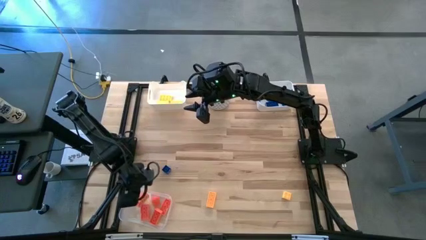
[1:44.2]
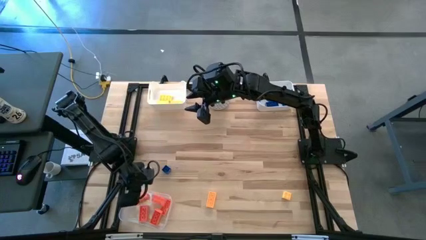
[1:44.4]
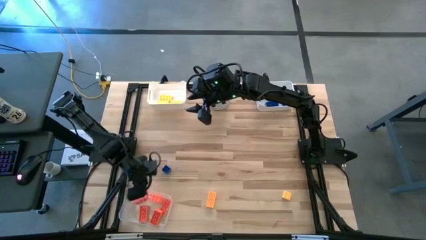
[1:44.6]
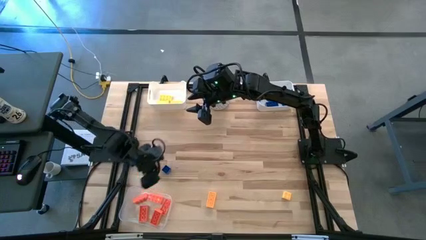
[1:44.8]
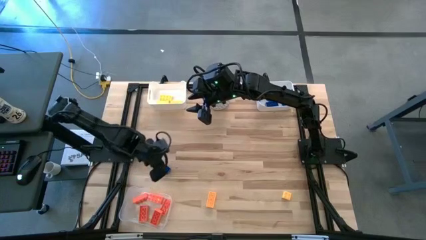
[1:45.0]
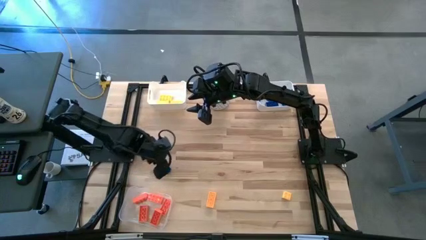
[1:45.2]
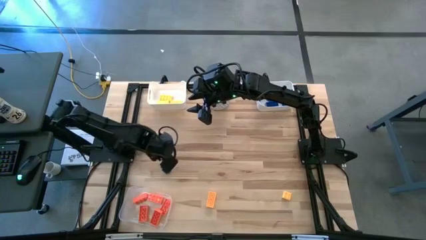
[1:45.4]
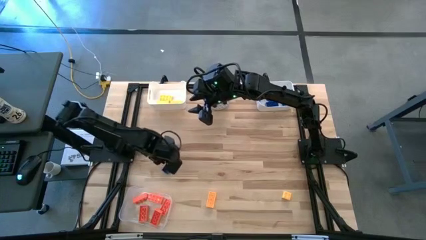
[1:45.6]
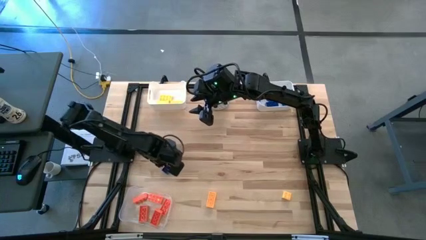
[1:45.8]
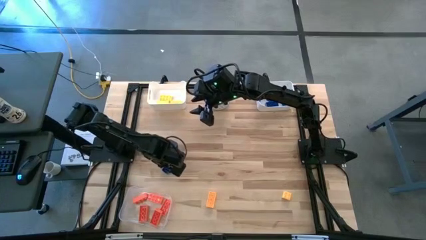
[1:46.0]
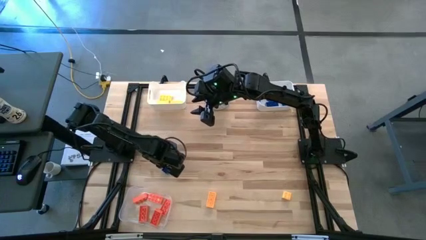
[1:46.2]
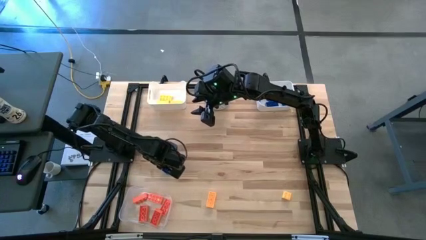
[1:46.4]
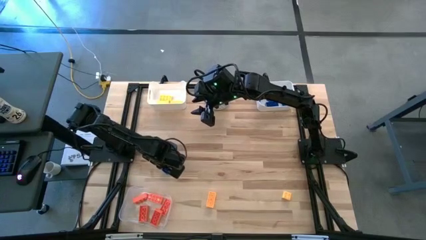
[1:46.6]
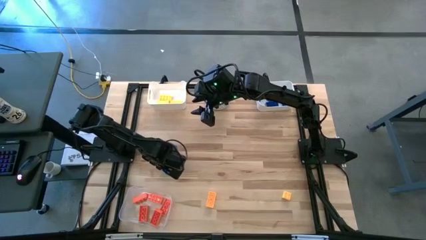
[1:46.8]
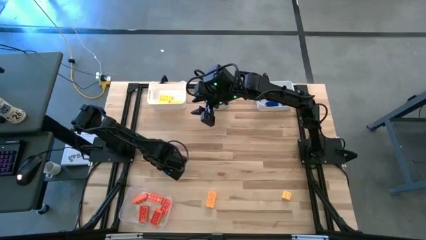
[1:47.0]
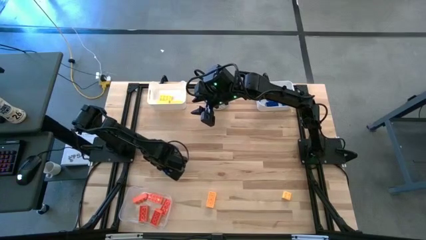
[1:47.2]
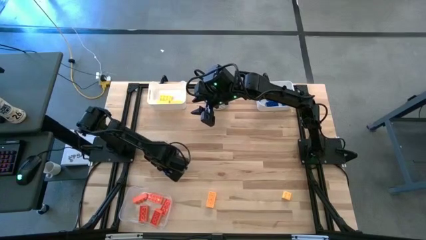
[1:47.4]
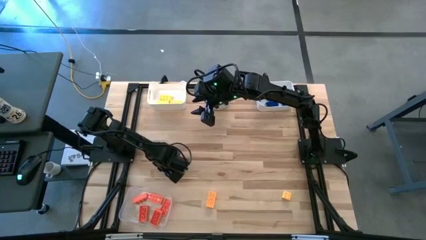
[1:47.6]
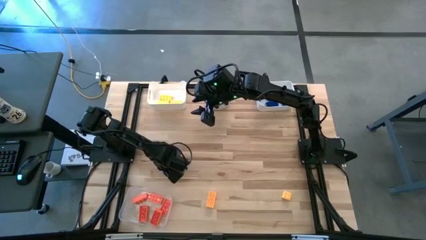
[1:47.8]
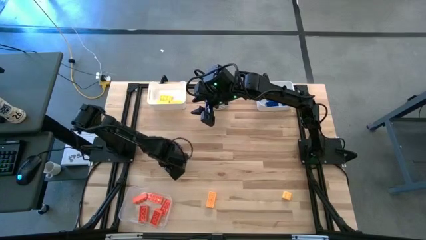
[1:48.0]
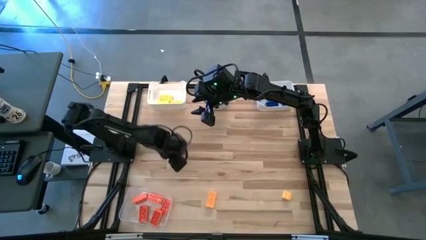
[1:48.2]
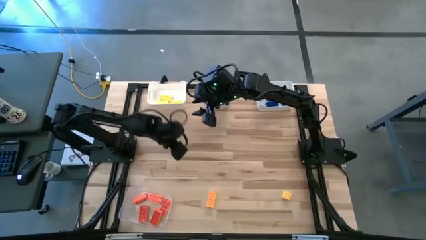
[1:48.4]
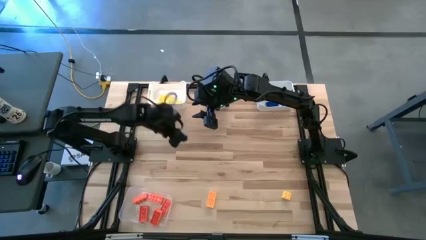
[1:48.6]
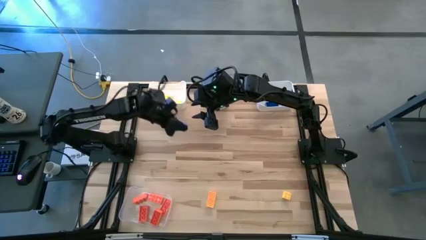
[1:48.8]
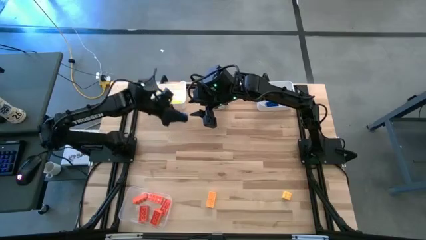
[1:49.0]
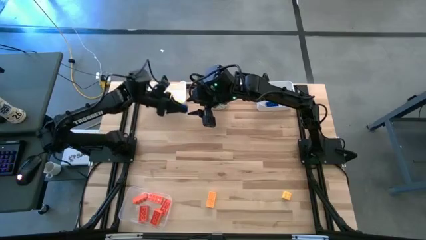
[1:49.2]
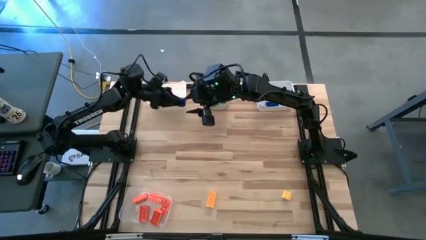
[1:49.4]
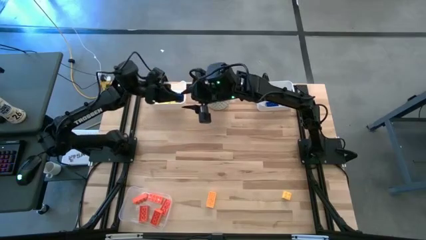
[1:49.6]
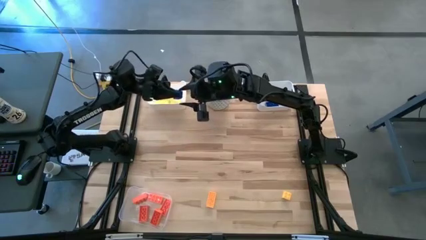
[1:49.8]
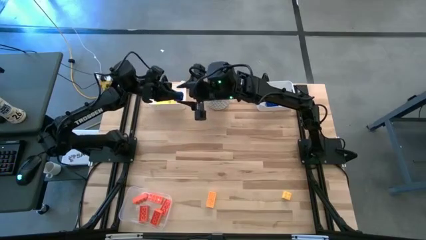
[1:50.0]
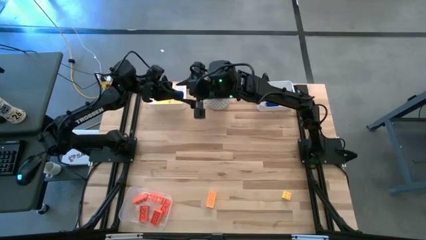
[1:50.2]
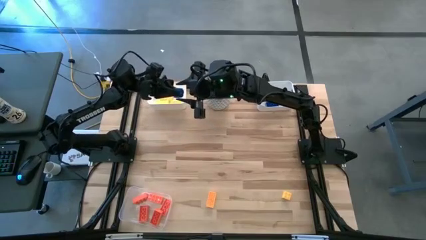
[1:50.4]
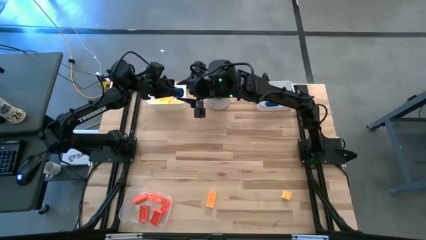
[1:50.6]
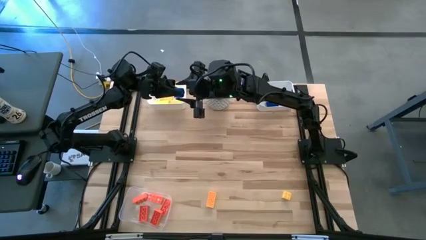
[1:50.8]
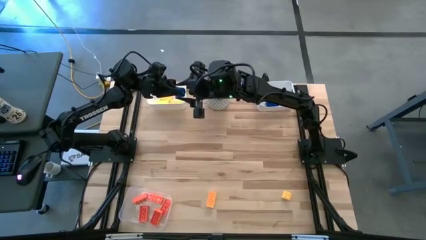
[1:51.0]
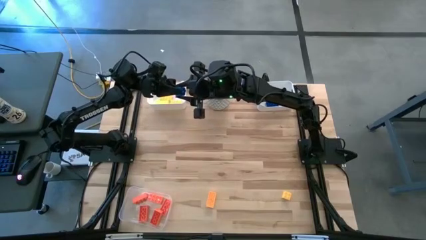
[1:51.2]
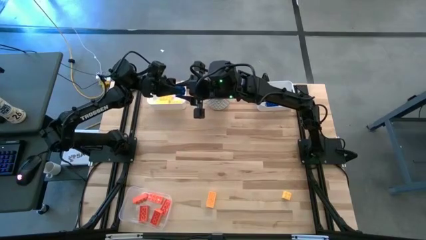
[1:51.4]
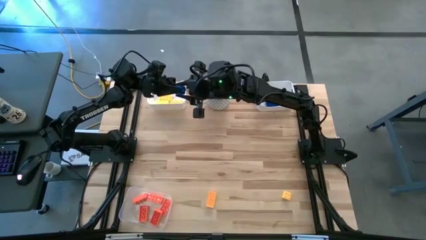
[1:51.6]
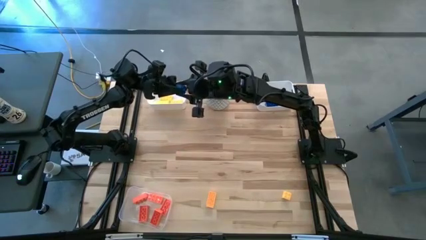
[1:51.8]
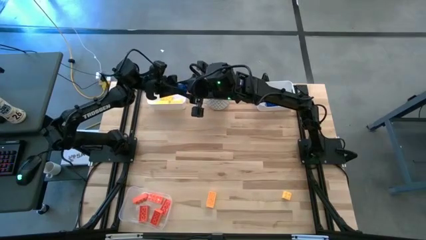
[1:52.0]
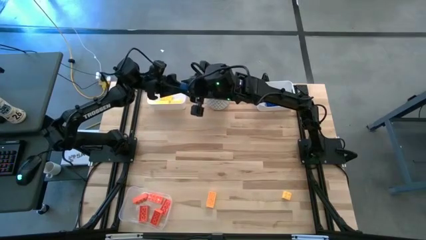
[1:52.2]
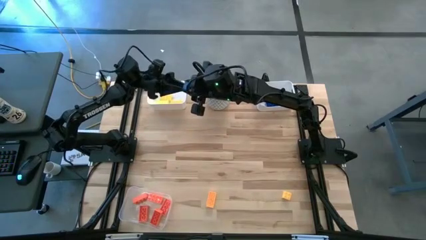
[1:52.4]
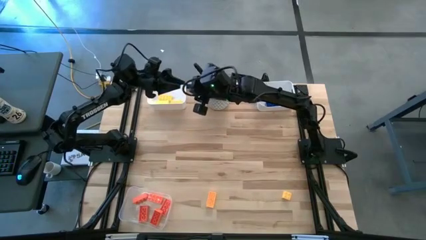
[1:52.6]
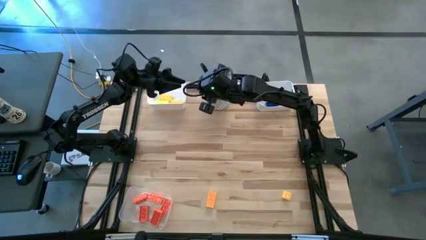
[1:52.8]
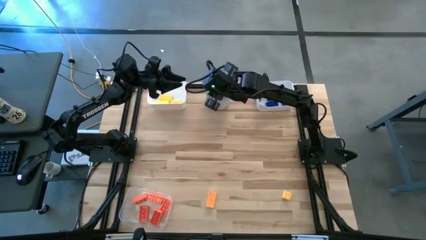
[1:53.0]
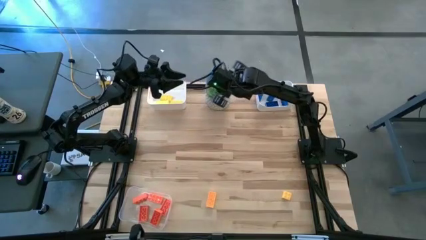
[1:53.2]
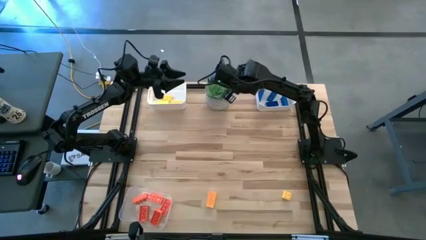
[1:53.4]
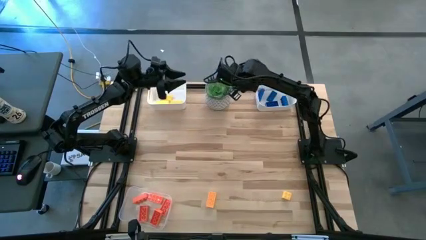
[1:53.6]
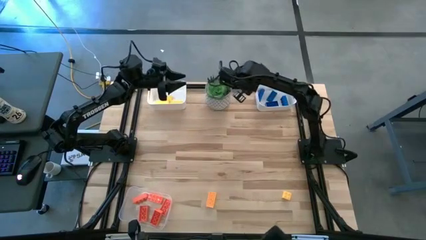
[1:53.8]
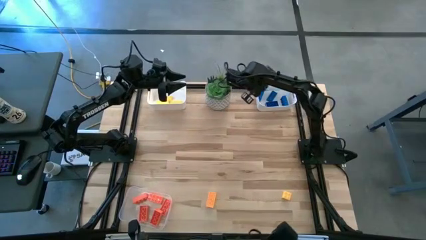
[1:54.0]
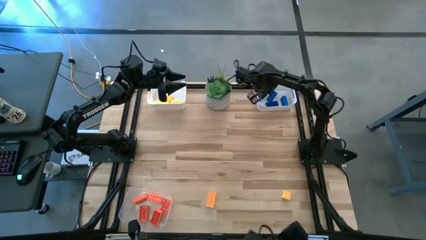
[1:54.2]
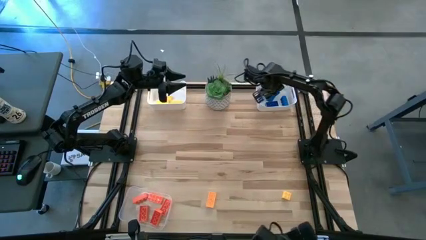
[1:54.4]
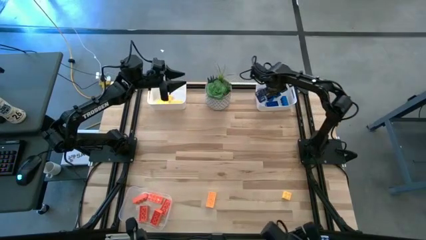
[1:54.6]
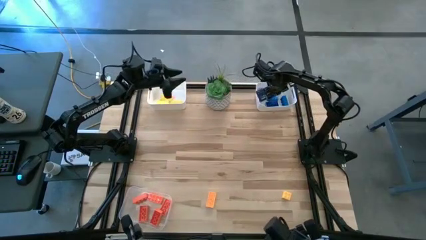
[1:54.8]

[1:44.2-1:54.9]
Task: Sort & place blocks by color
Put the blue game piece into the right white bin
